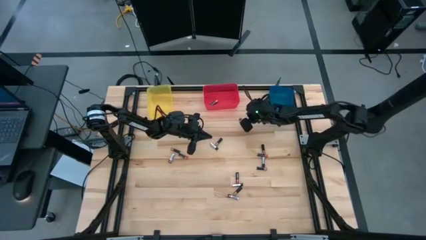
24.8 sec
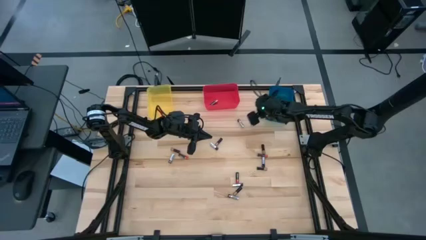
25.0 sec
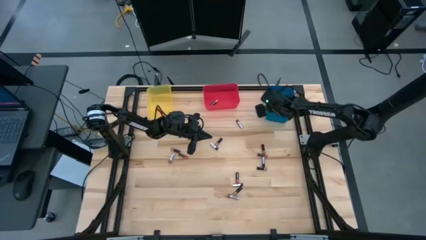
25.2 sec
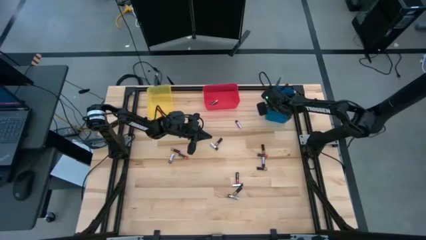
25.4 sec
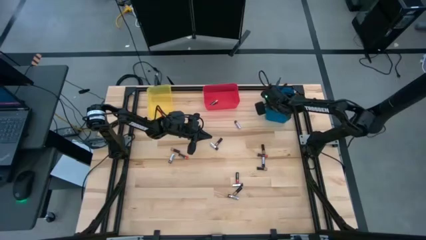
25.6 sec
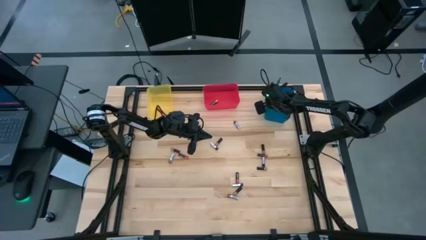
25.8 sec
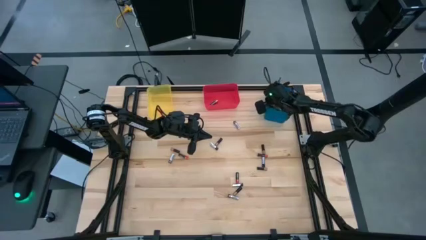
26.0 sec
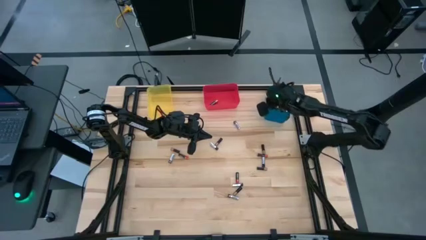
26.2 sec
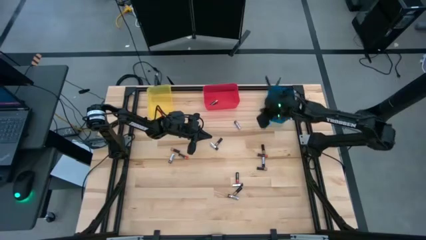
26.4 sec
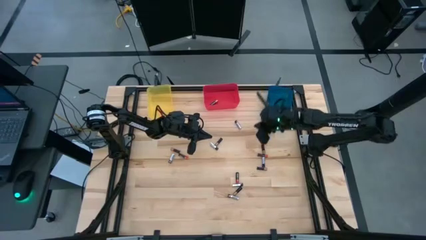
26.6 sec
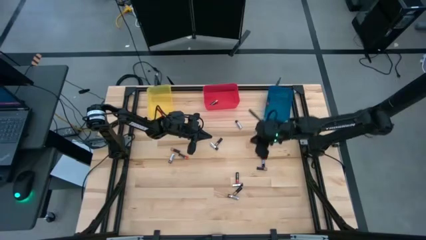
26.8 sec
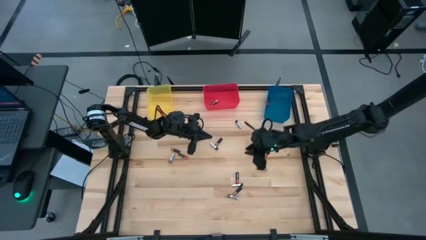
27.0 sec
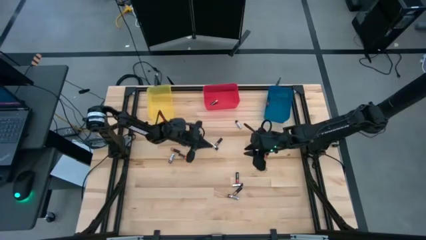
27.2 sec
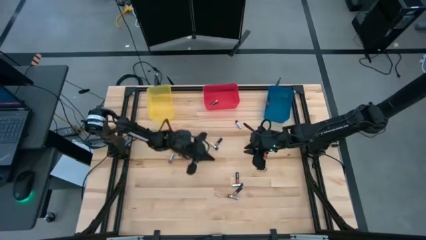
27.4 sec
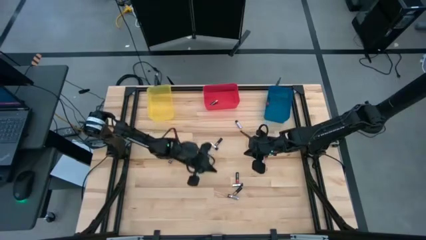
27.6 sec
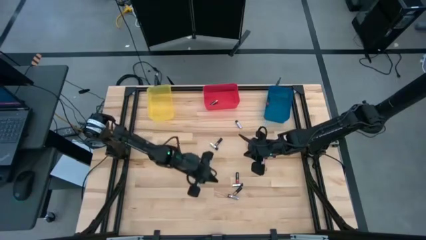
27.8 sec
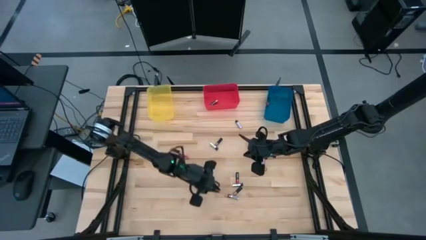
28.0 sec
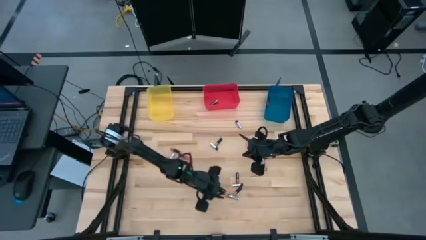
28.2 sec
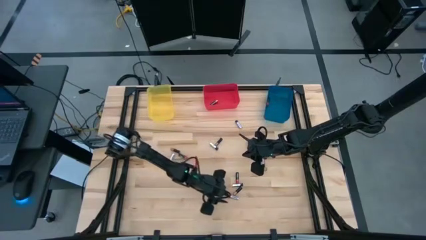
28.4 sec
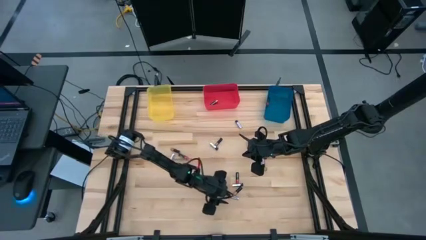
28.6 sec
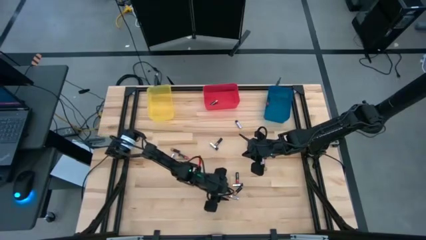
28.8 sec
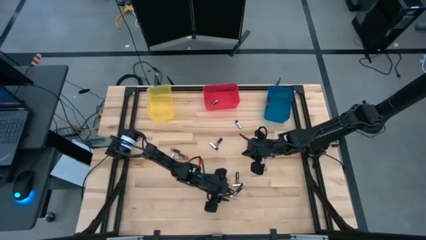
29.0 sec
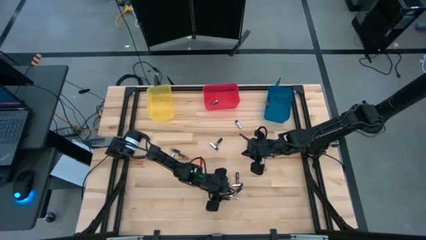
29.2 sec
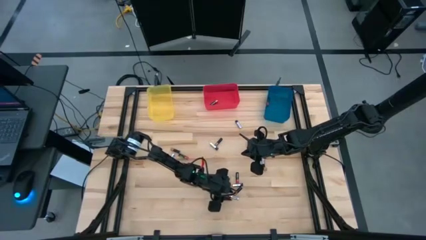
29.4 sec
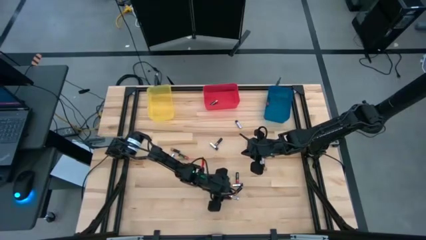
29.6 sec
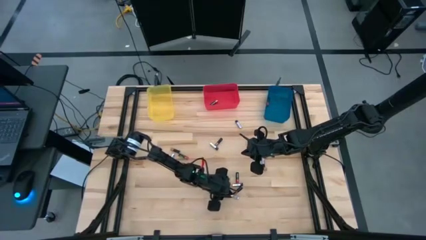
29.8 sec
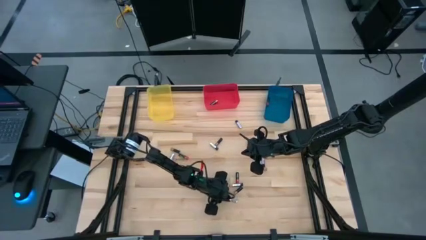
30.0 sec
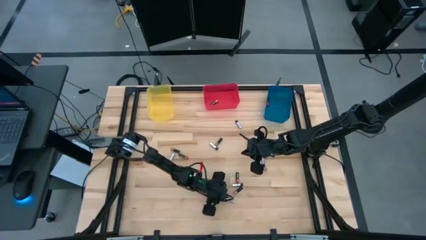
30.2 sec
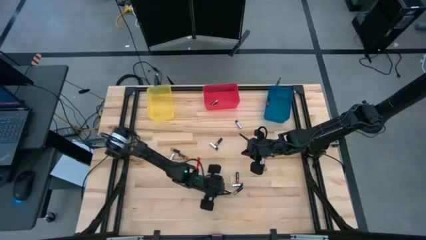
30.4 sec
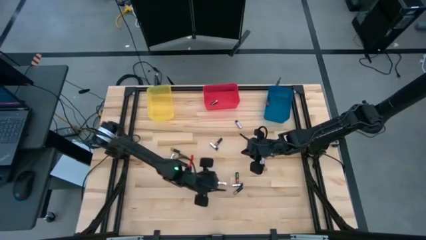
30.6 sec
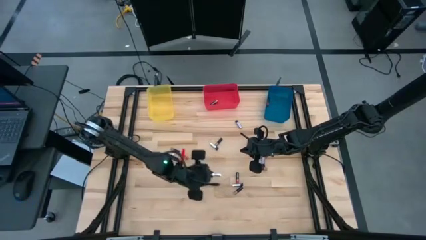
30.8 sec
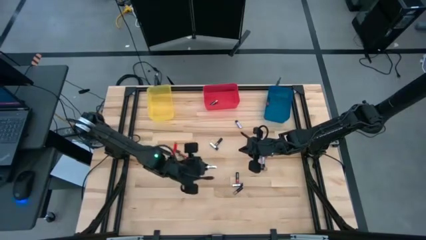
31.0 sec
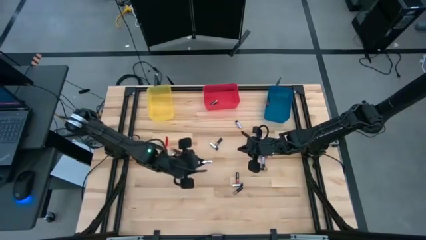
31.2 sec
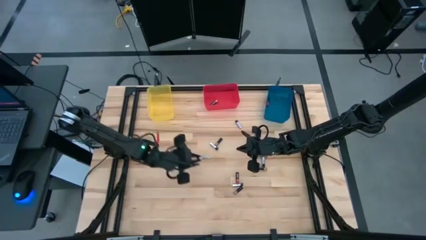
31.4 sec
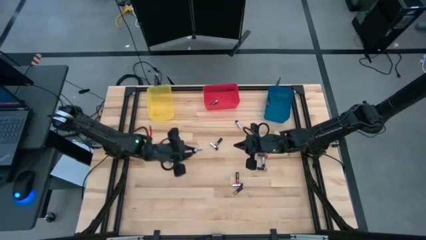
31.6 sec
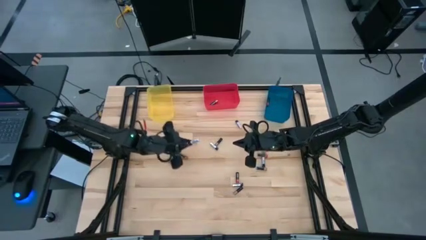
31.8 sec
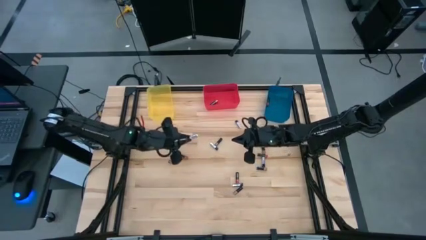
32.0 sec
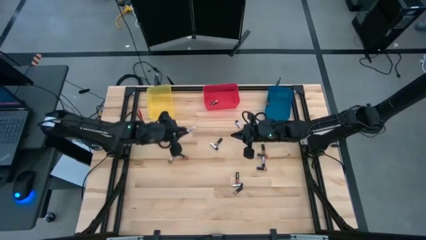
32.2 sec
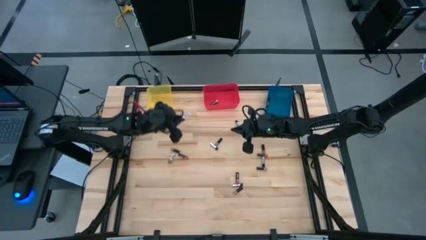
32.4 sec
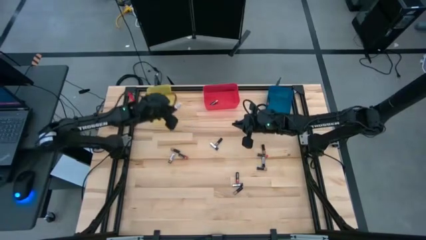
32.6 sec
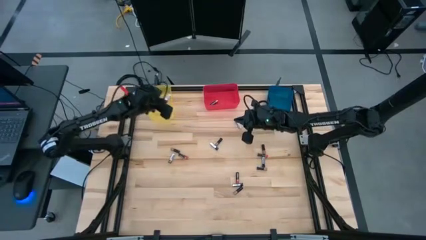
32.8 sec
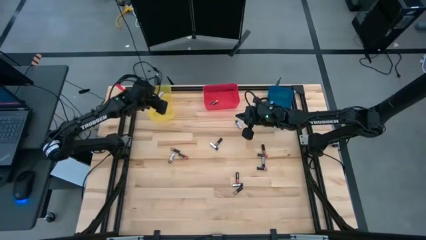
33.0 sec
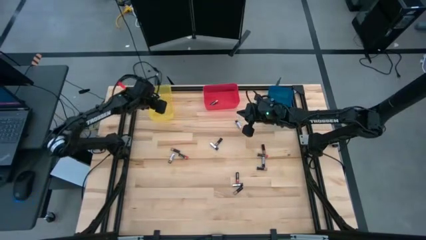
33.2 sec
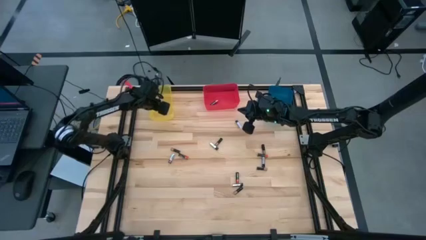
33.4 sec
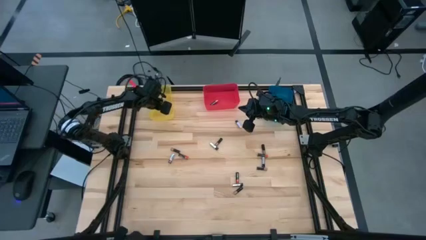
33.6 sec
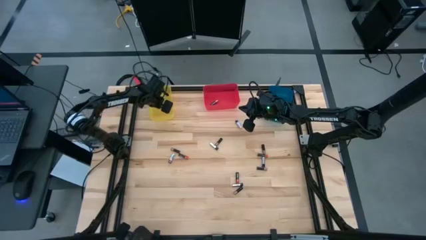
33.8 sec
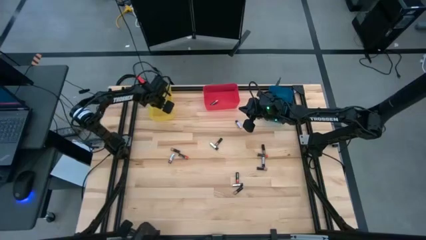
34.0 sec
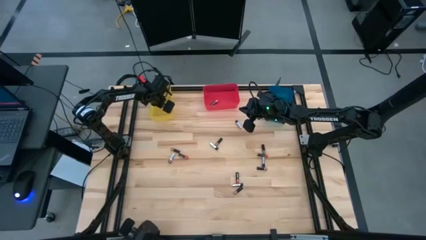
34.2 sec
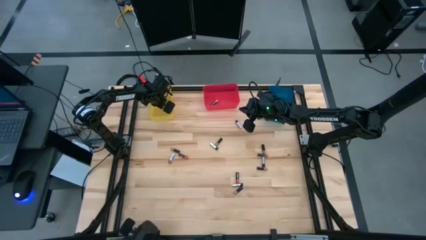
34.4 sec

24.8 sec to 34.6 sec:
Task: Sort batteries
Put the silver battery into the yellow bin

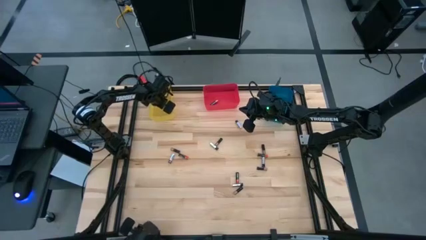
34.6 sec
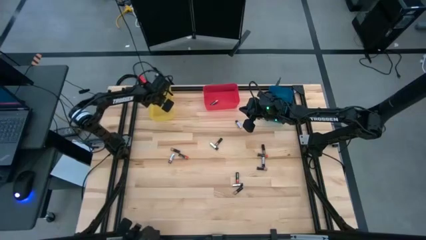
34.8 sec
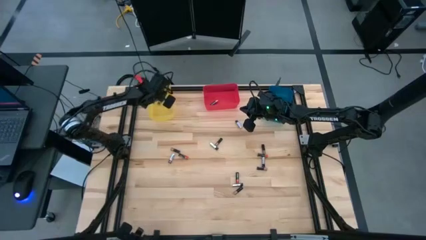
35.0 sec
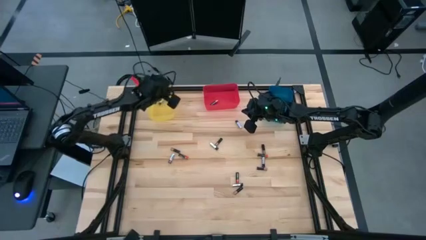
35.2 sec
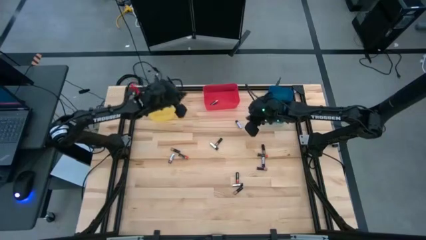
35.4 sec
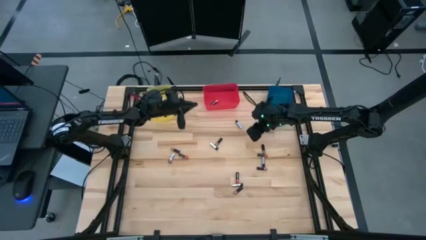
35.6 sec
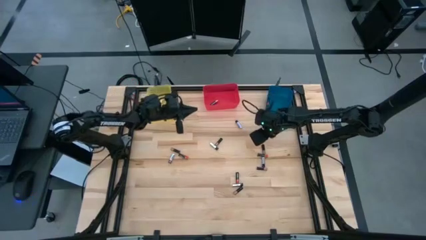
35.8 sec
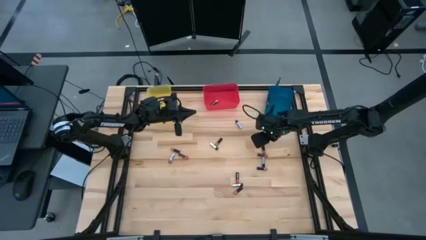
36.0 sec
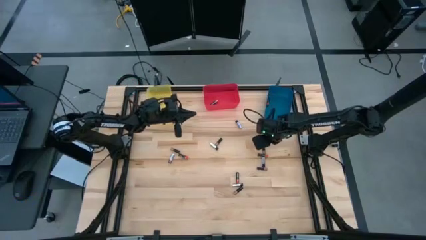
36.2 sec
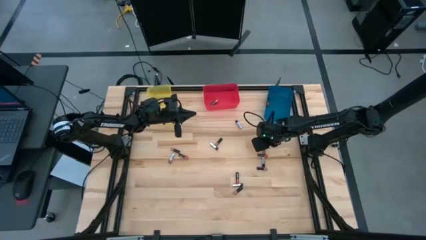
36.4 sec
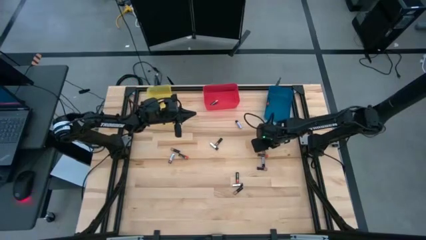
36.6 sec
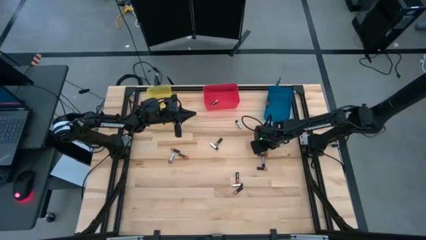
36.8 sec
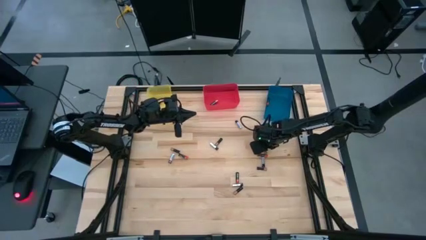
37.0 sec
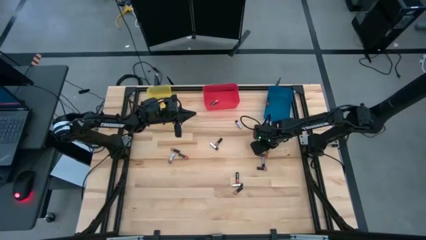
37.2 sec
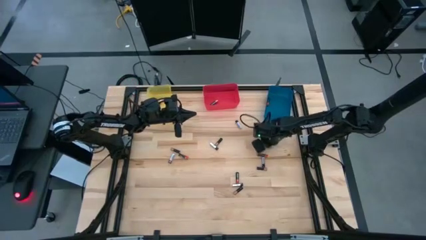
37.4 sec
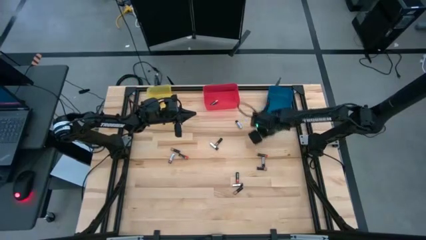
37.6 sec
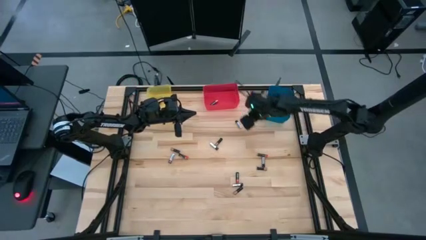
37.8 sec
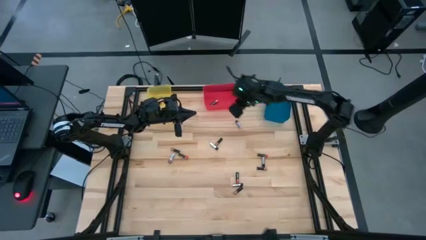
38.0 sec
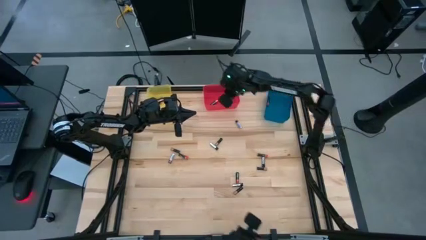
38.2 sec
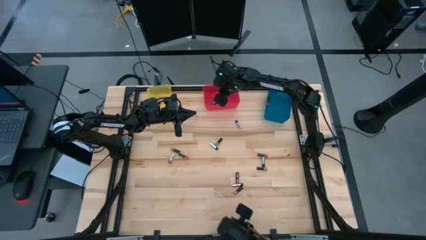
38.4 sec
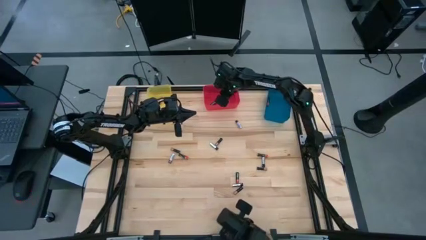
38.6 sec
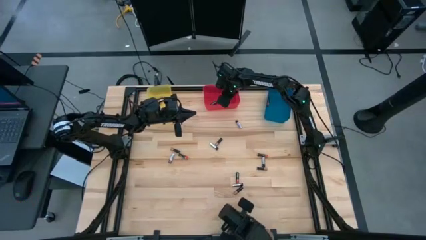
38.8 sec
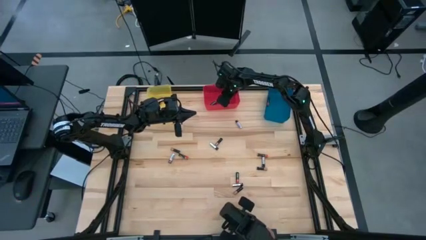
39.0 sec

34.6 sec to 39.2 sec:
Put the brown battery into the red bin

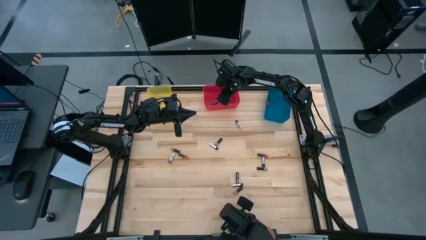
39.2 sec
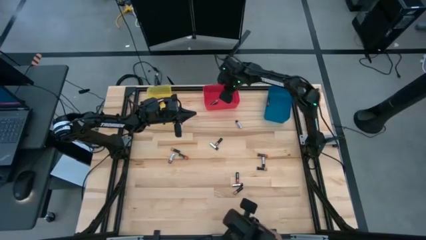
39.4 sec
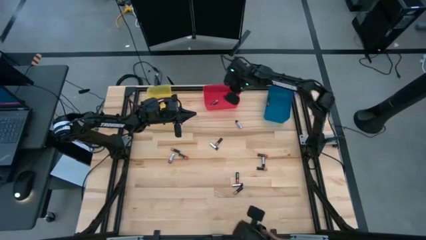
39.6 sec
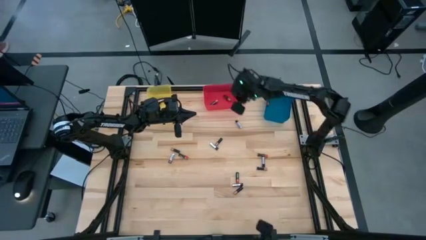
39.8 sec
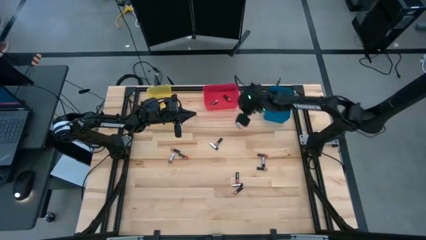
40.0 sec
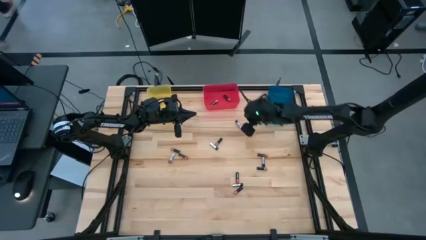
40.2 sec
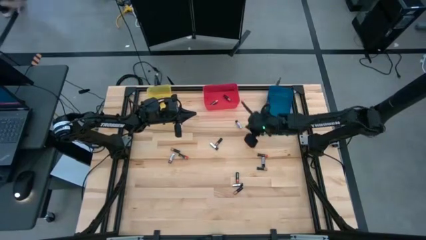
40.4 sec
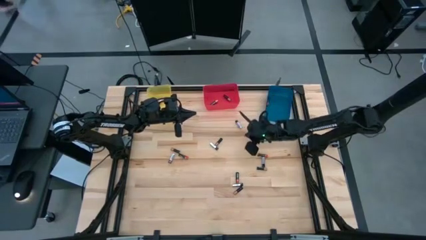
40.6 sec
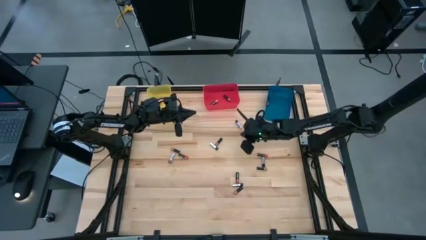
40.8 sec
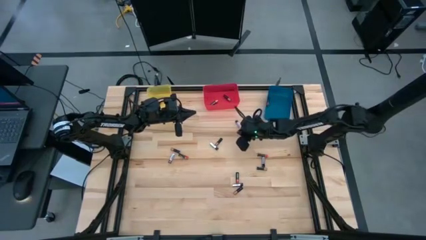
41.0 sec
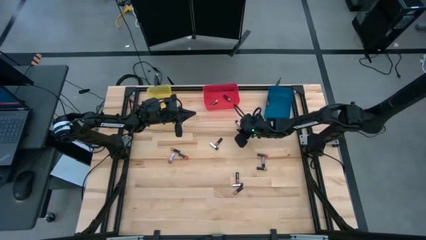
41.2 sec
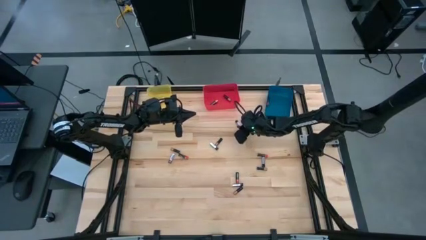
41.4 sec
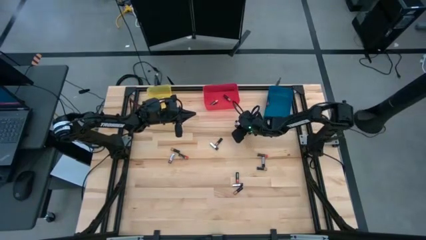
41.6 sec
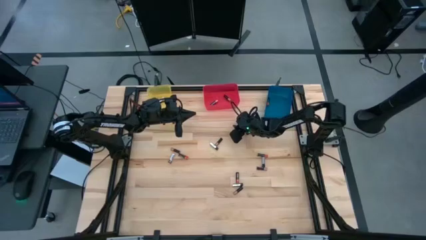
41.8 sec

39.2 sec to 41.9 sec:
Put the silver battery into the yellow bin
